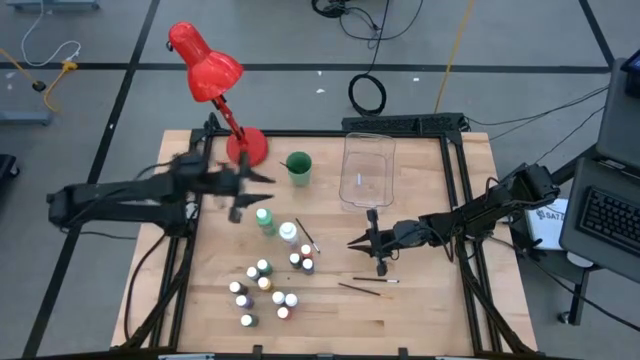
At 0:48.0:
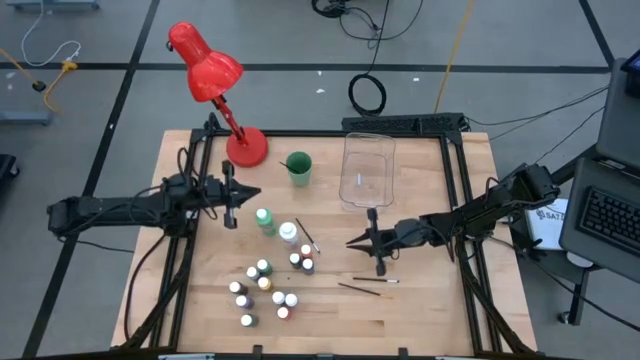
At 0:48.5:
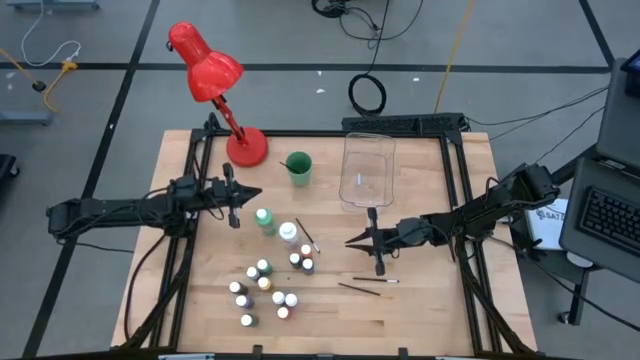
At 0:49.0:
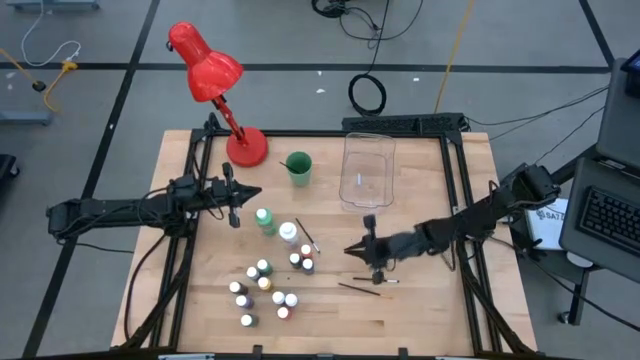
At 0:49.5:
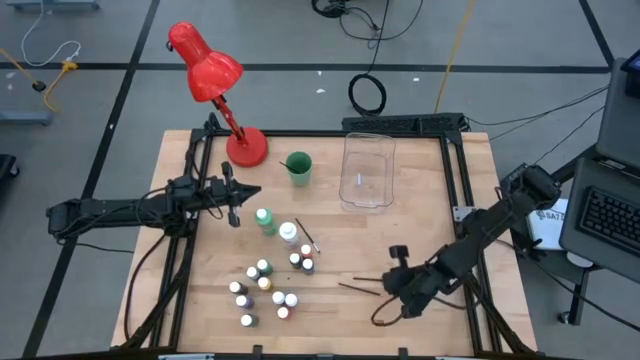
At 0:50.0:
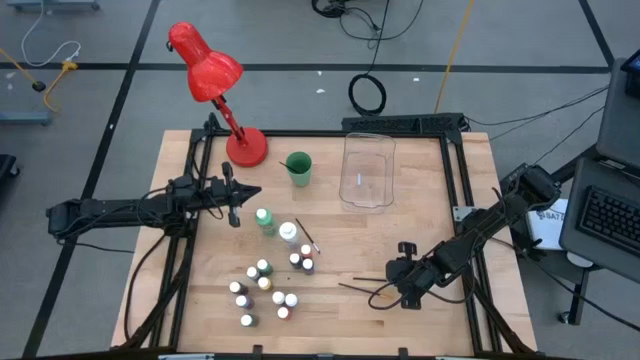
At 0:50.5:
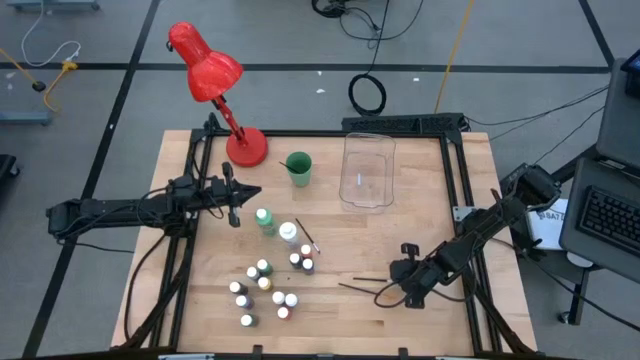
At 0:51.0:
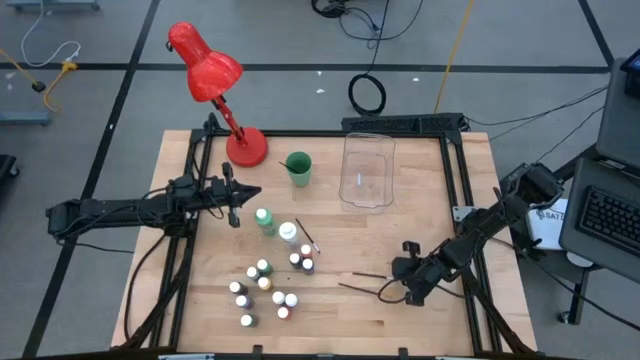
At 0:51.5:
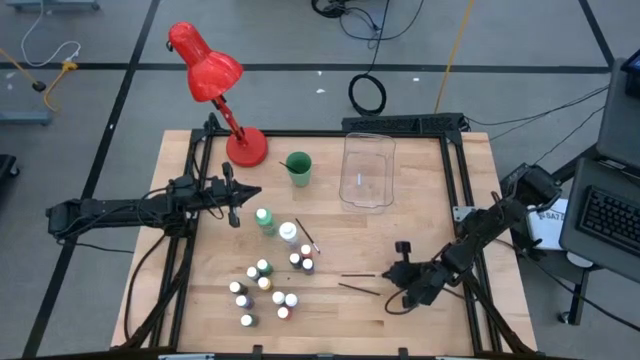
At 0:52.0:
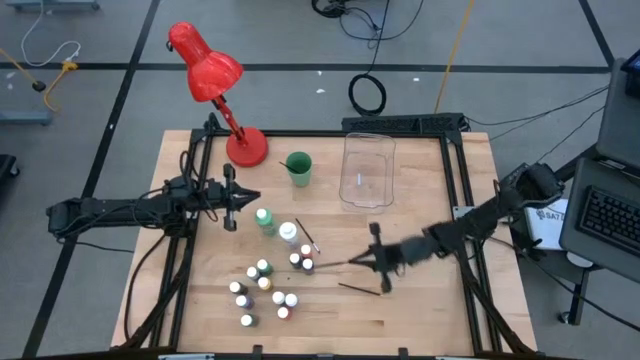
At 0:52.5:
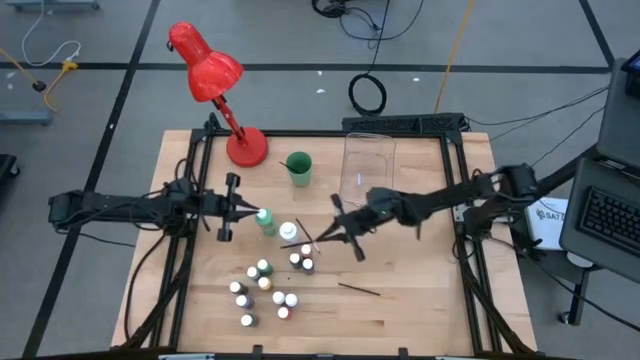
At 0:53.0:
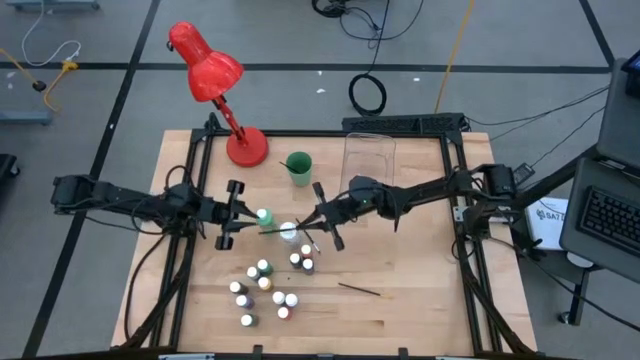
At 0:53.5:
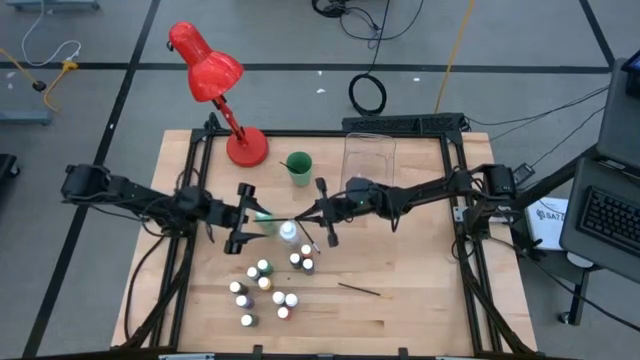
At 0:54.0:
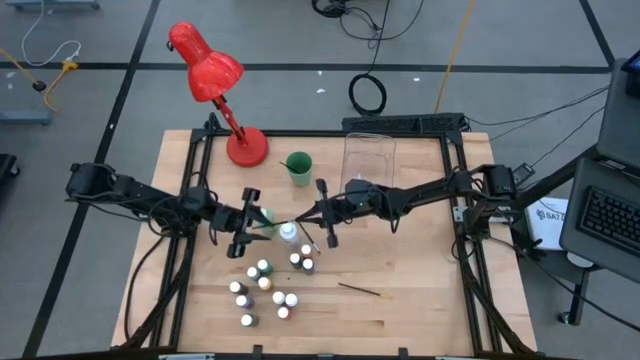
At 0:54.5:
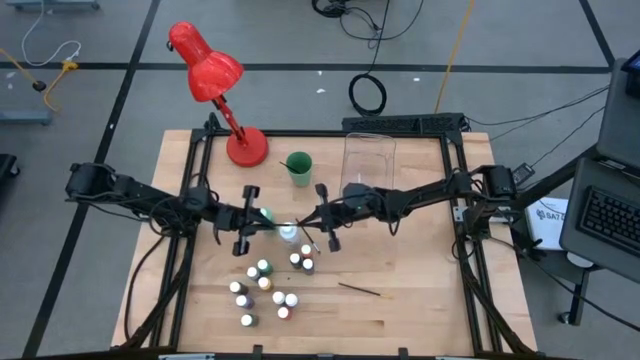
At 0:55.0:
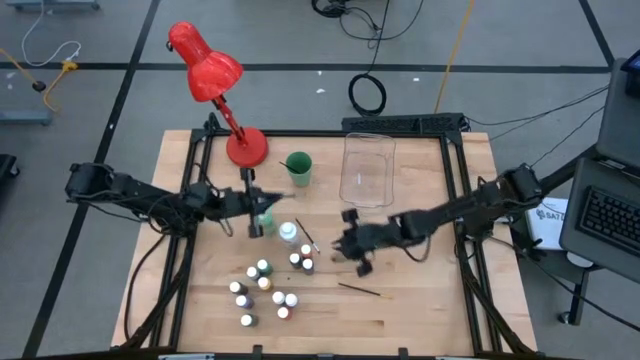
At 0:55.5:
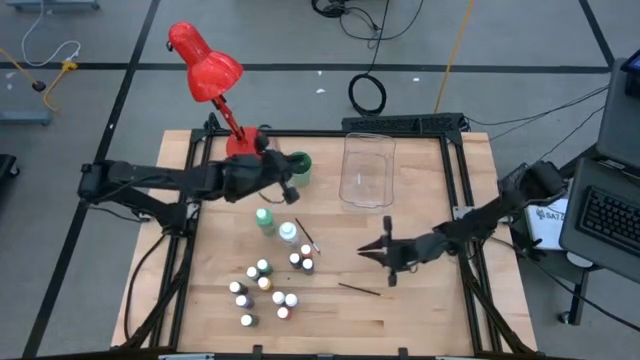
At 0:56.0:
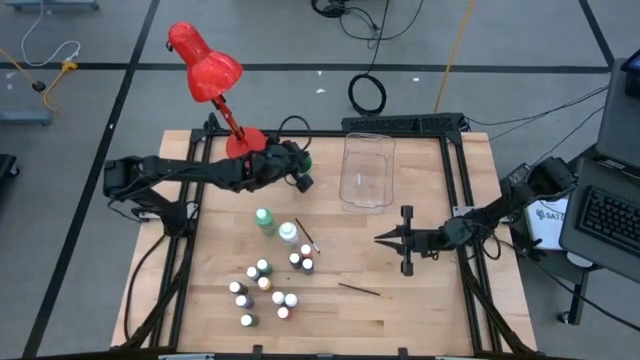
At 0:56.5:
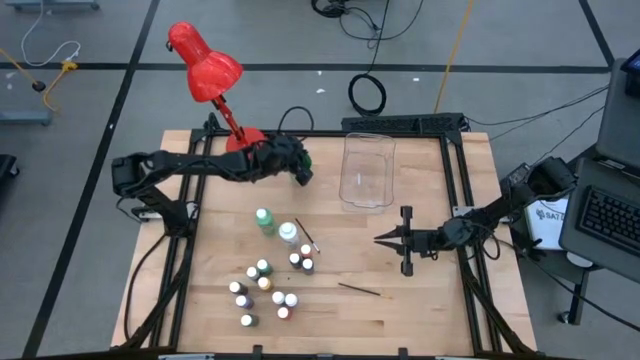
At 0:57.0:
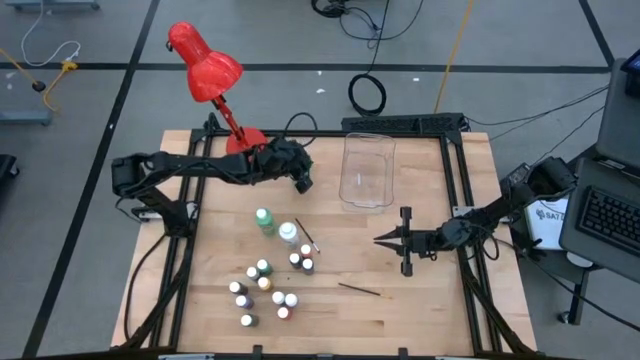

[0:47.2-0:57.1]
Task: Pick & Place Paint Supplies
Put the silver paintbrush into the green cup

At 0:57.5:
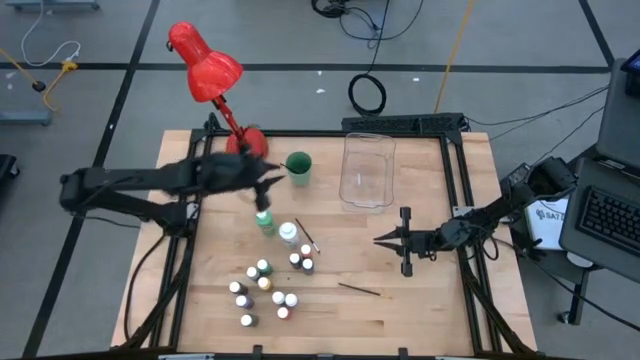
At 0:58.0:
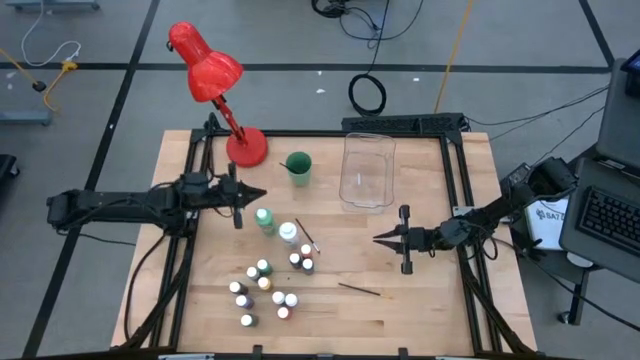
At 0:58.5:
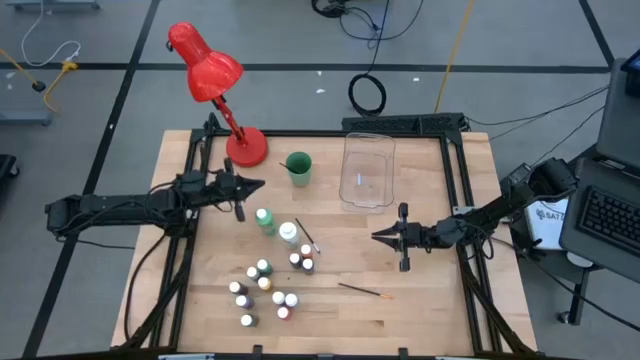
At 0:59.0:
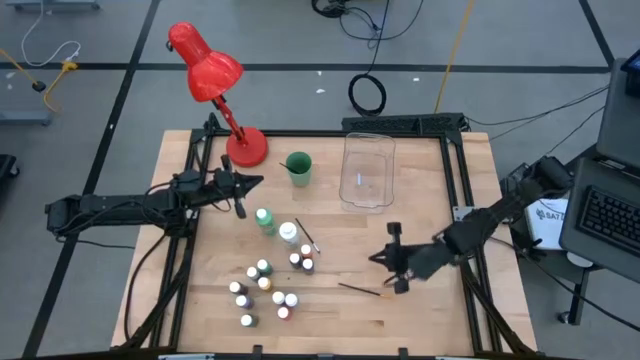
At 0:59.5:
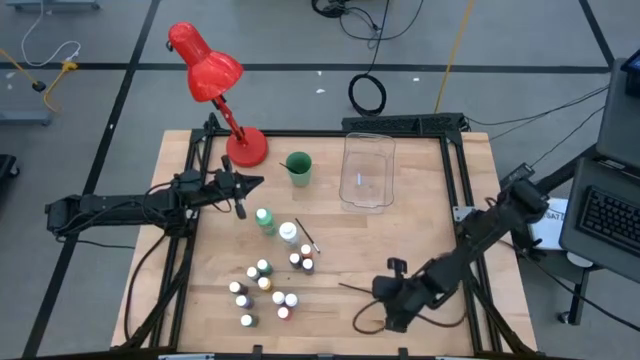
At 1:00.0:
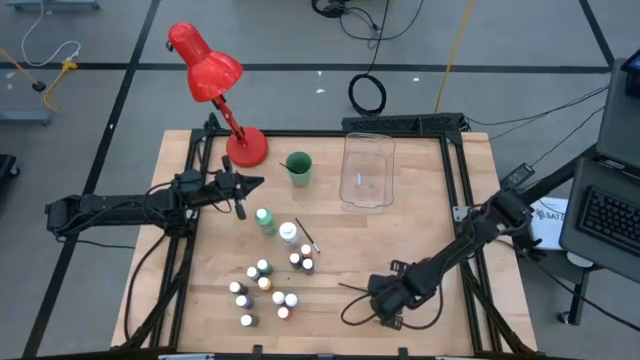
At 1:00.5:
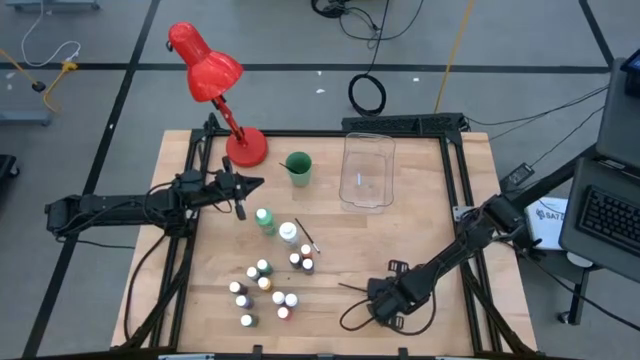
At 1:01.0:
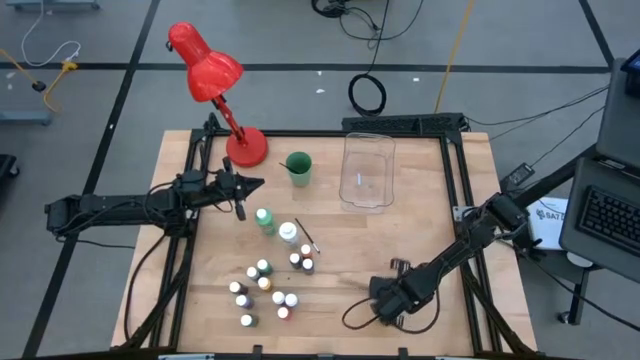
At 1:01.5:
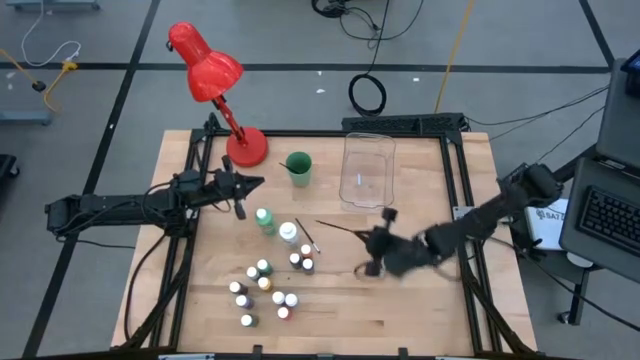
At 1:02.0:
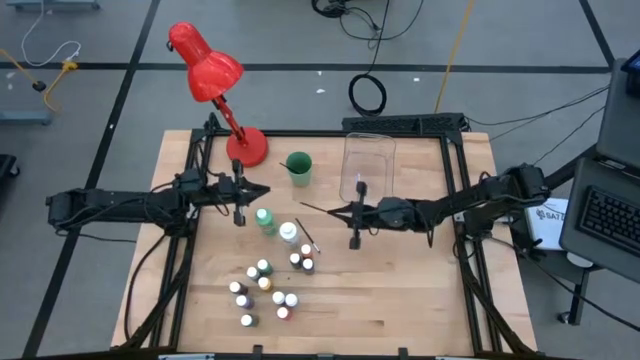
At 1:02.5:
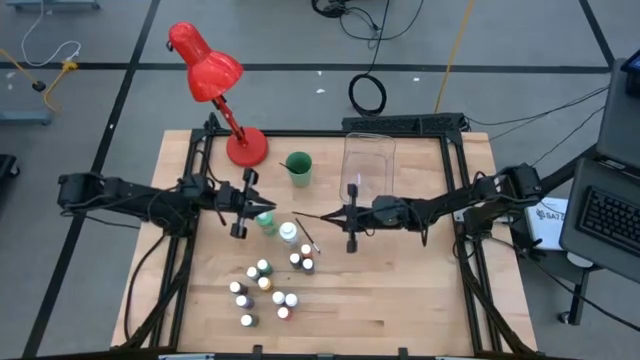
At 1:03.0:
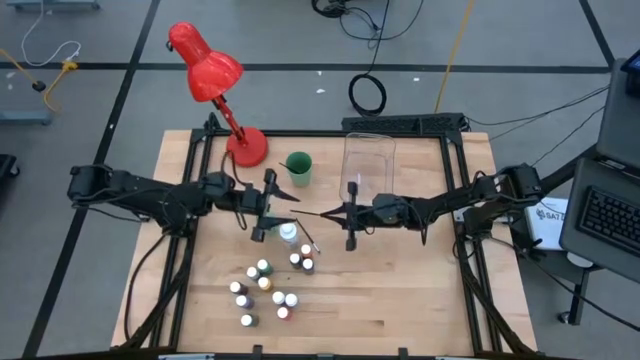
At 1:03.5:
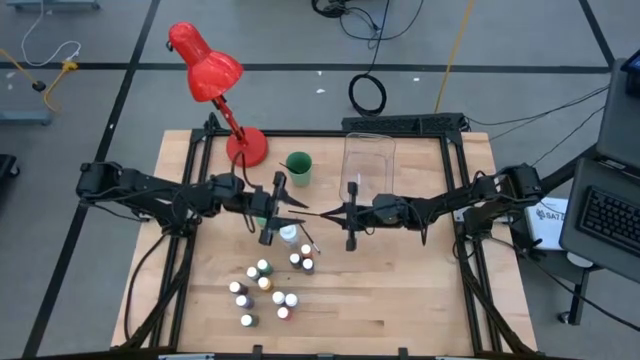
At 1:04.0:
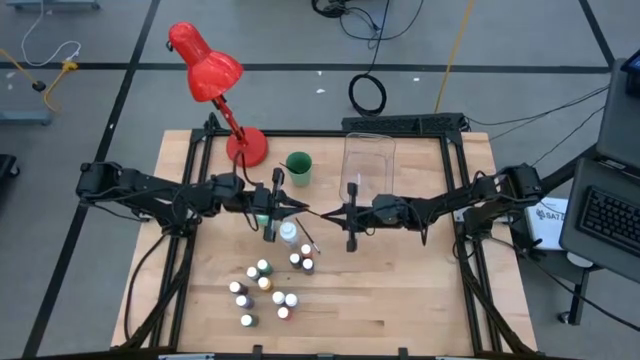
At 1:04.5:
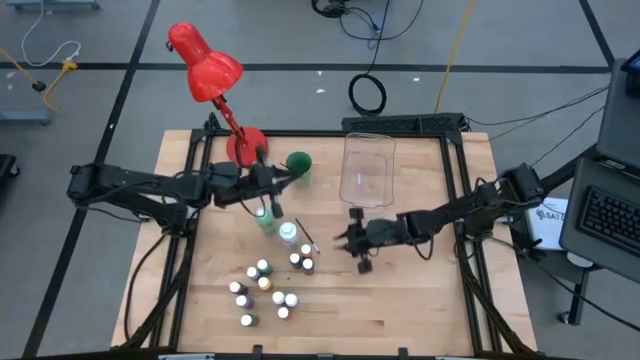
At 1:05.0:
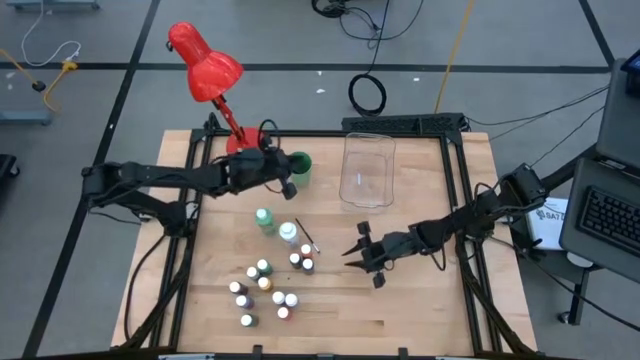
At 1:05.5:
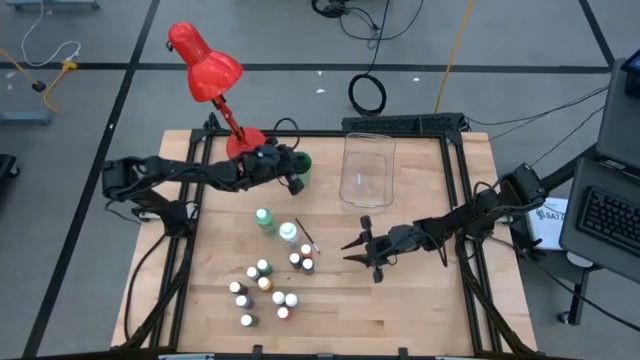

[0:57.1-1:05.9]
Put the gold paintbrush into the green cup

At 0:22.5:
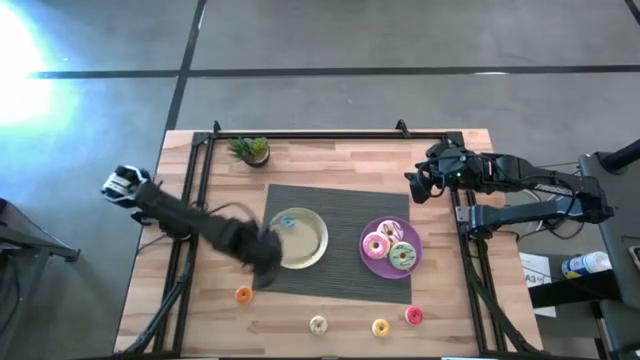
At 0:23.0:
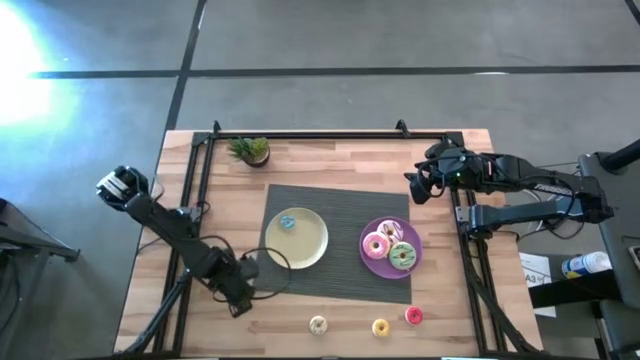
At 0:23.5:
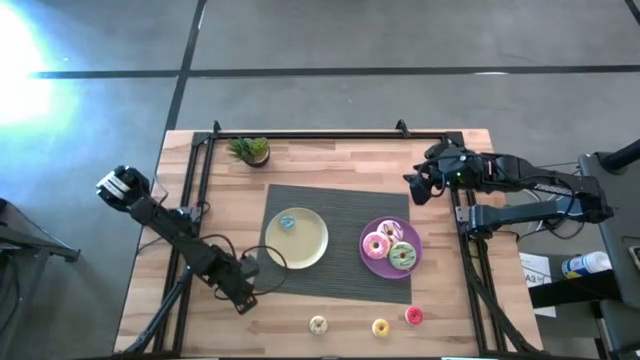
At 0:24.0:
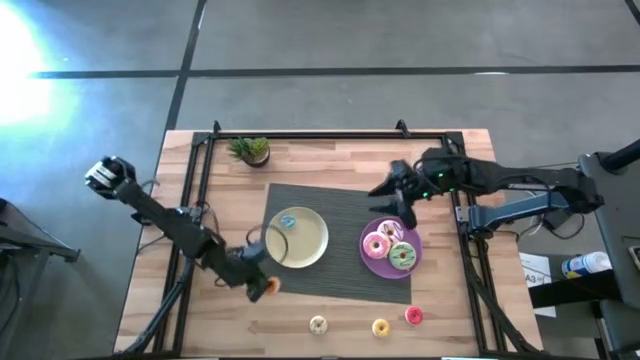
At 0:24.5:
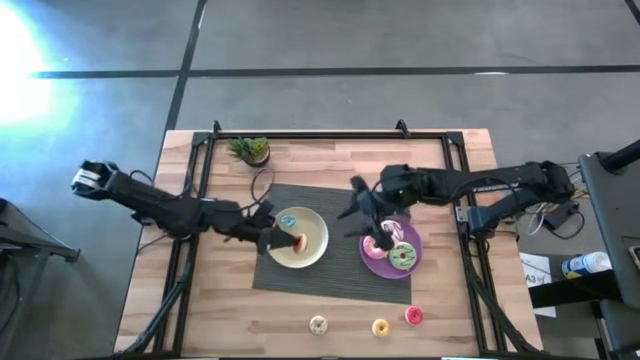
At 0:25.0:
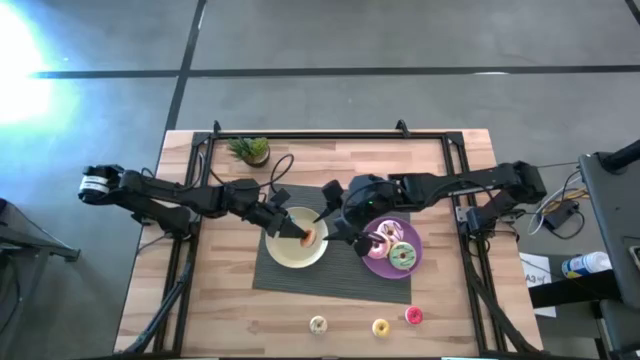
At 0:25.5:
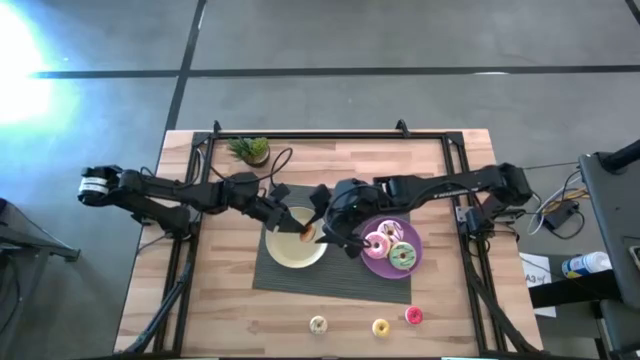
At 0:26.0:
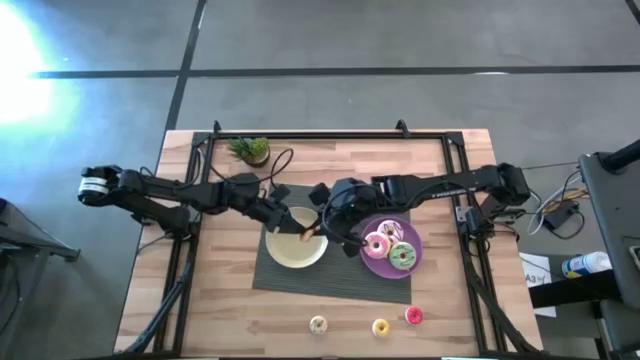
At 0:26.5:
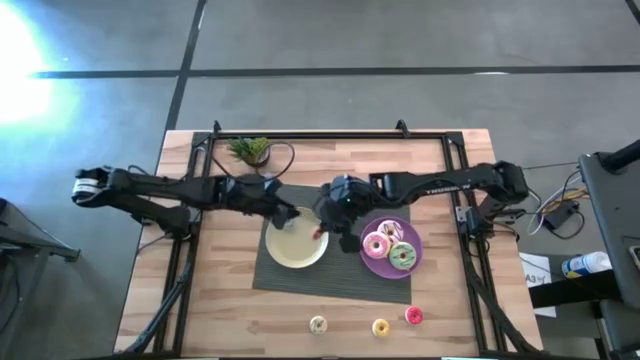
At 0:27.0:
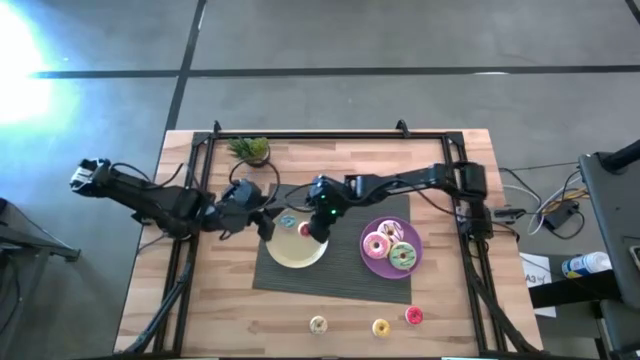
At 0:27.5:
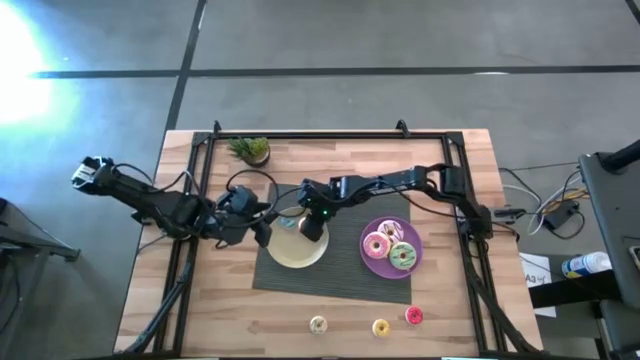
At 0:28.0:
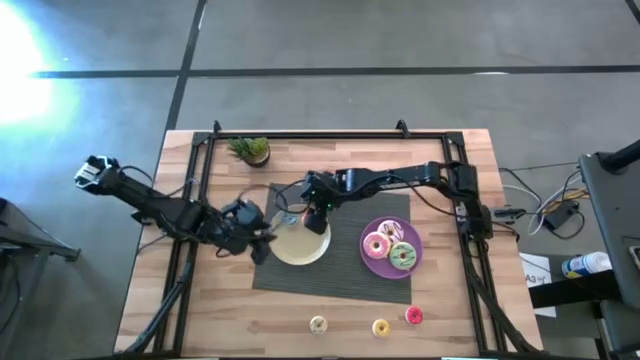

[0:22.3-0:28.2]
Task: Pick & Place donuts
Put the small orange donut on the beige plate
